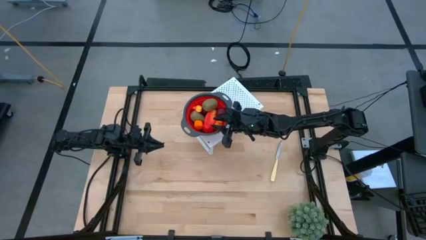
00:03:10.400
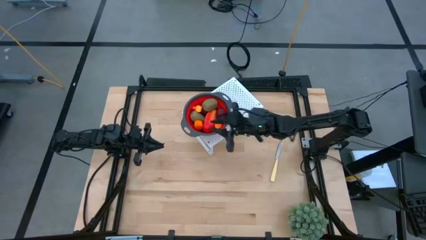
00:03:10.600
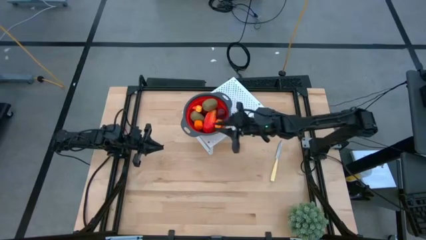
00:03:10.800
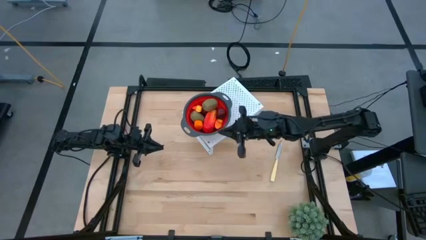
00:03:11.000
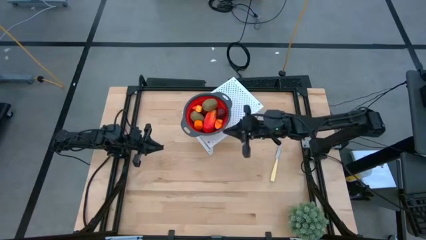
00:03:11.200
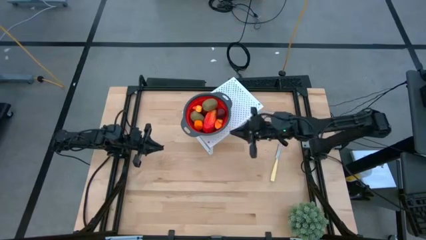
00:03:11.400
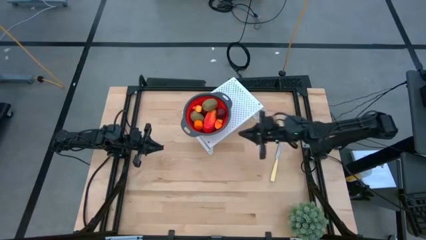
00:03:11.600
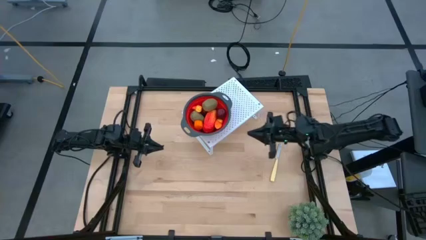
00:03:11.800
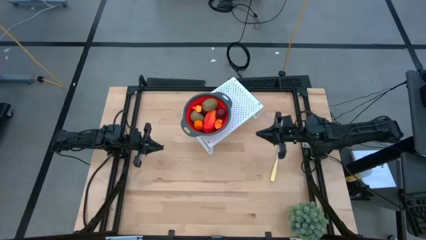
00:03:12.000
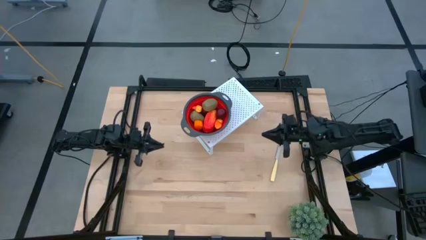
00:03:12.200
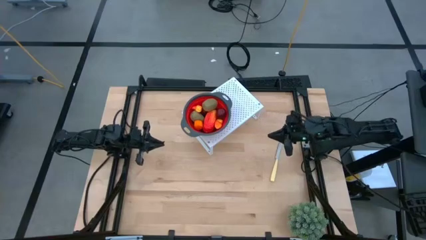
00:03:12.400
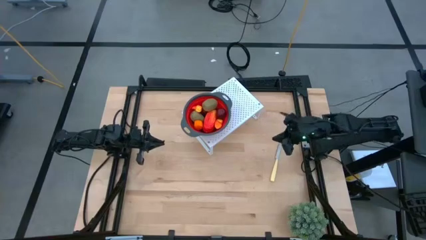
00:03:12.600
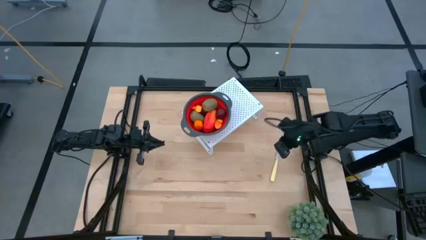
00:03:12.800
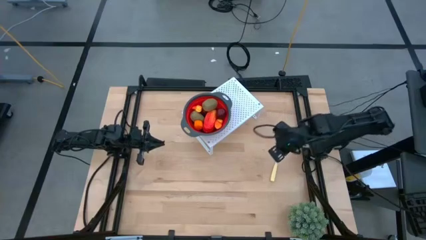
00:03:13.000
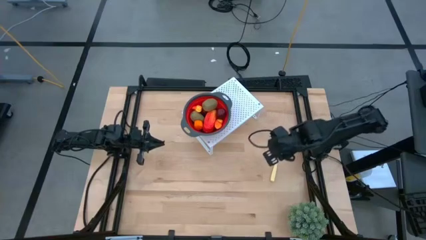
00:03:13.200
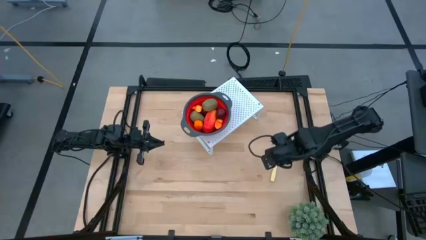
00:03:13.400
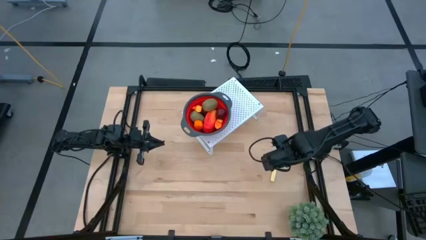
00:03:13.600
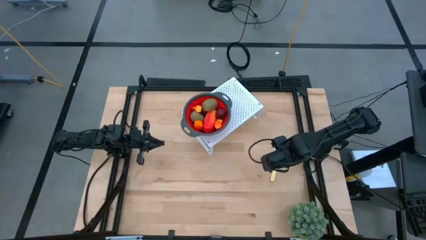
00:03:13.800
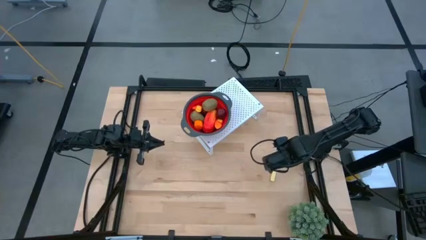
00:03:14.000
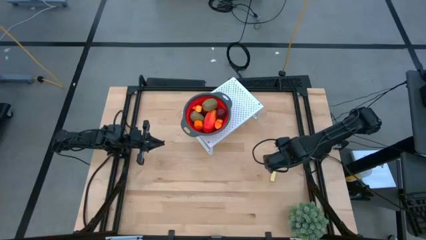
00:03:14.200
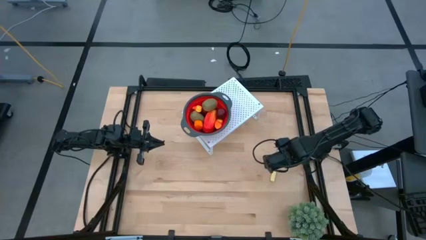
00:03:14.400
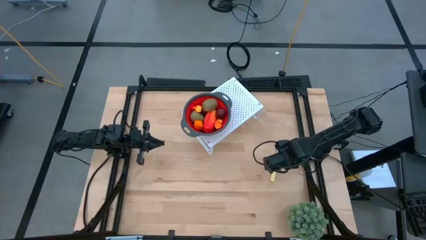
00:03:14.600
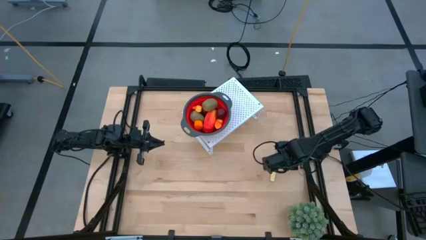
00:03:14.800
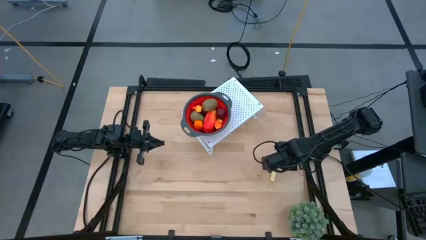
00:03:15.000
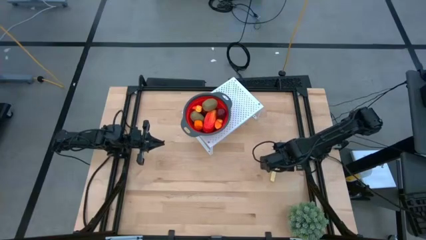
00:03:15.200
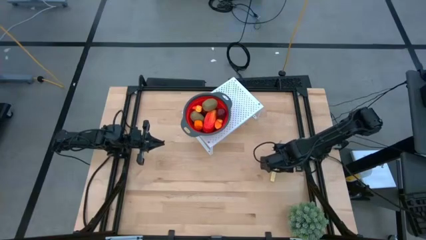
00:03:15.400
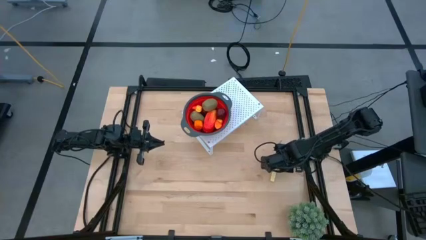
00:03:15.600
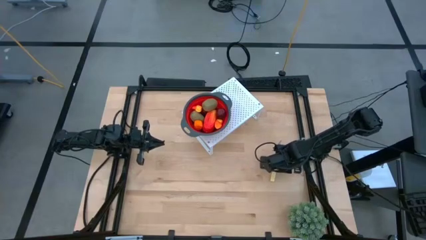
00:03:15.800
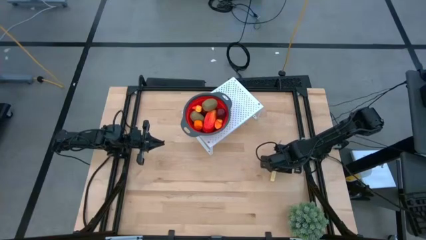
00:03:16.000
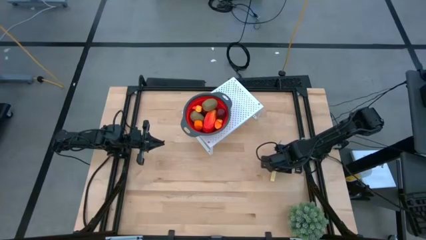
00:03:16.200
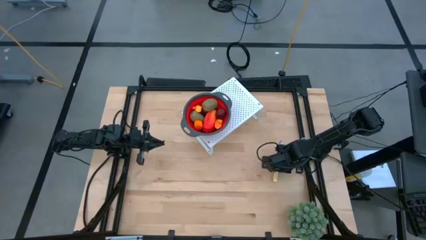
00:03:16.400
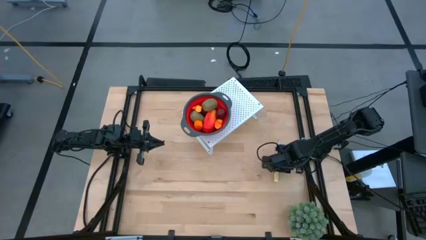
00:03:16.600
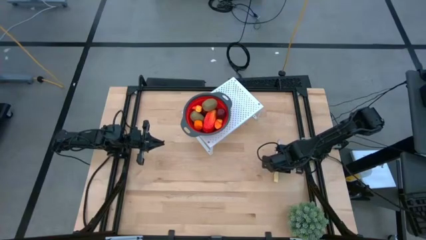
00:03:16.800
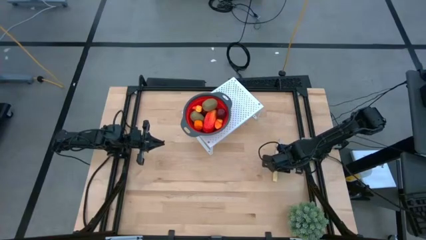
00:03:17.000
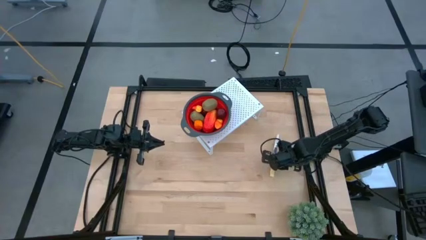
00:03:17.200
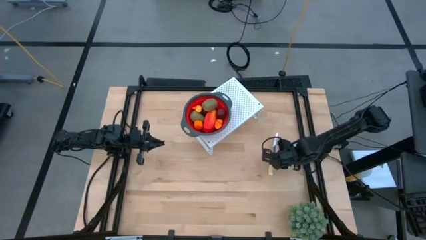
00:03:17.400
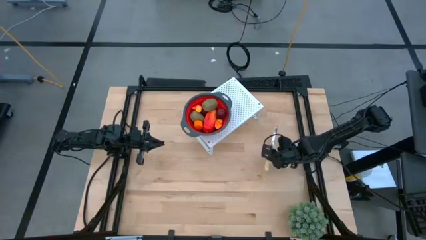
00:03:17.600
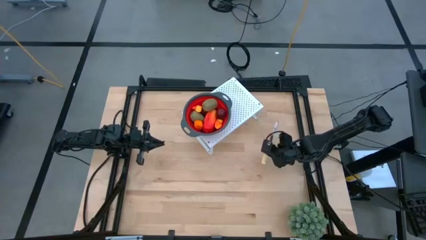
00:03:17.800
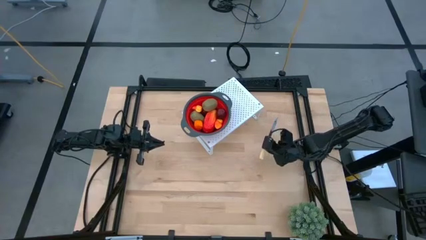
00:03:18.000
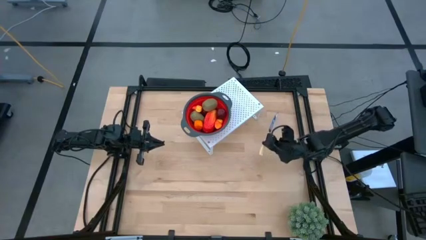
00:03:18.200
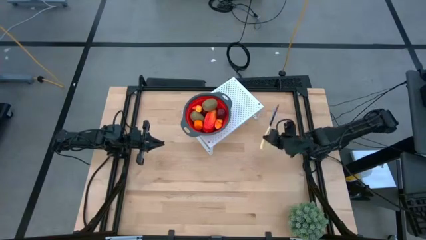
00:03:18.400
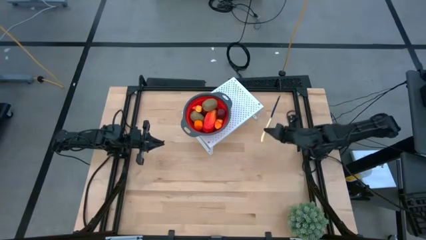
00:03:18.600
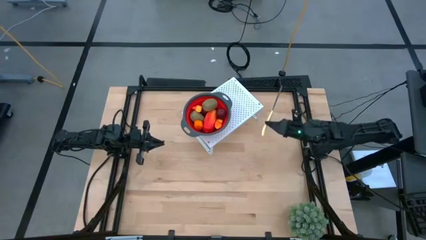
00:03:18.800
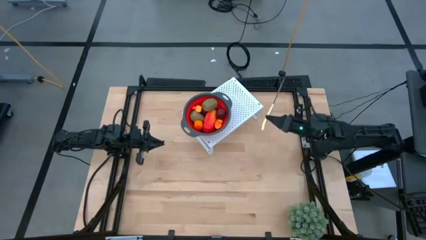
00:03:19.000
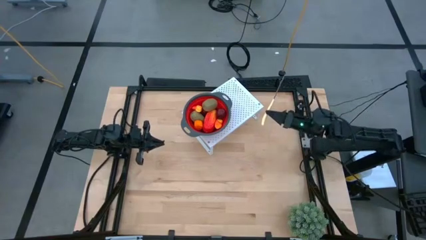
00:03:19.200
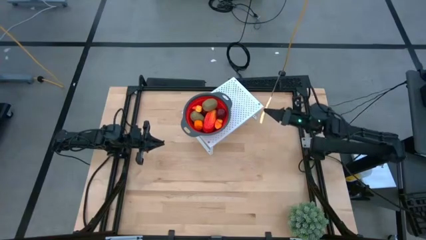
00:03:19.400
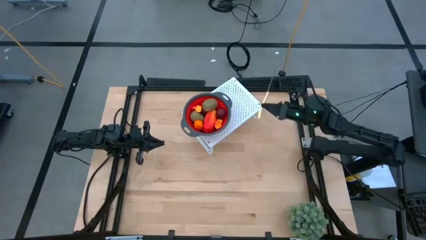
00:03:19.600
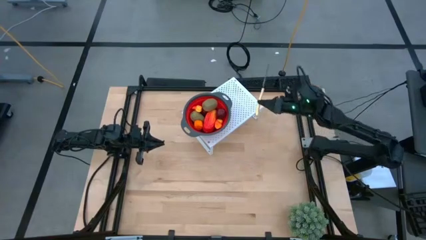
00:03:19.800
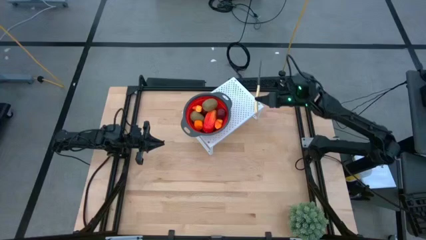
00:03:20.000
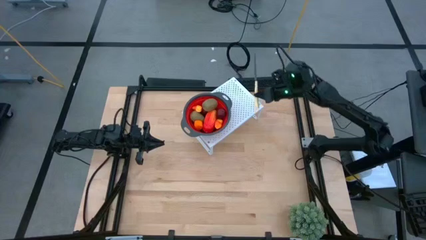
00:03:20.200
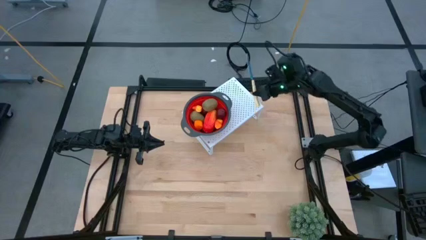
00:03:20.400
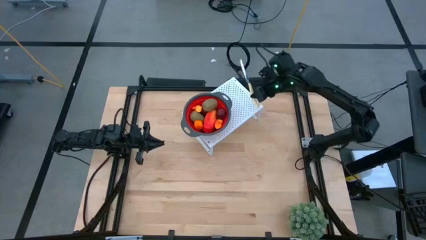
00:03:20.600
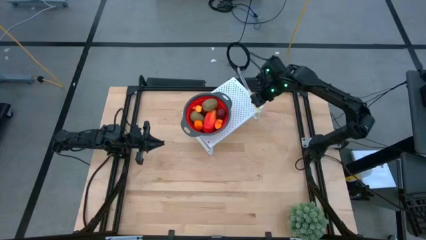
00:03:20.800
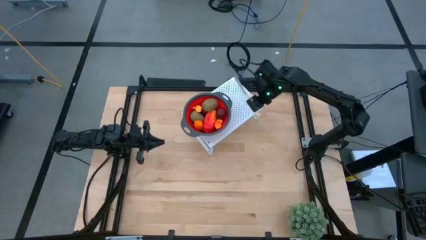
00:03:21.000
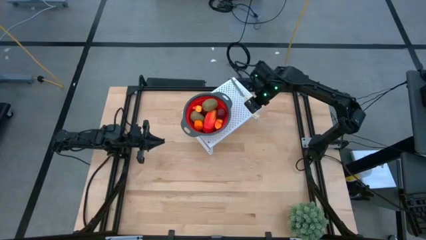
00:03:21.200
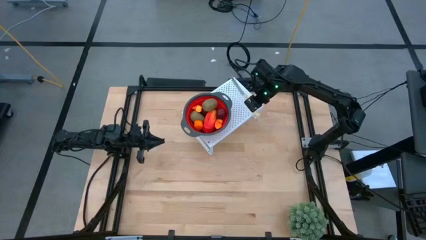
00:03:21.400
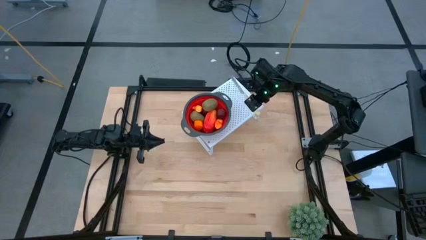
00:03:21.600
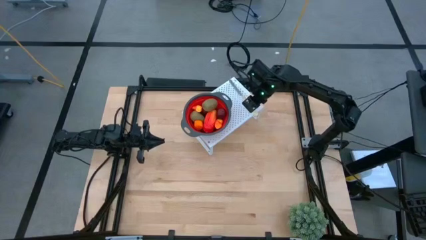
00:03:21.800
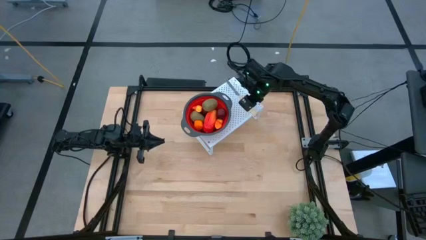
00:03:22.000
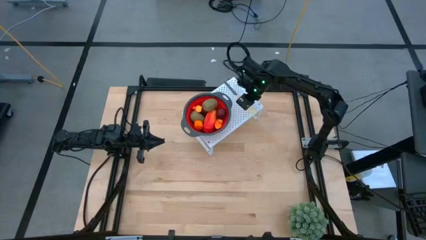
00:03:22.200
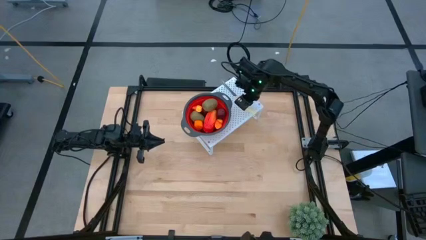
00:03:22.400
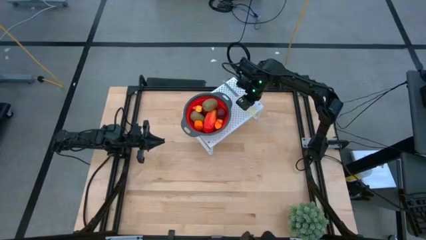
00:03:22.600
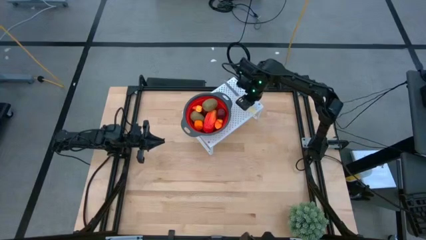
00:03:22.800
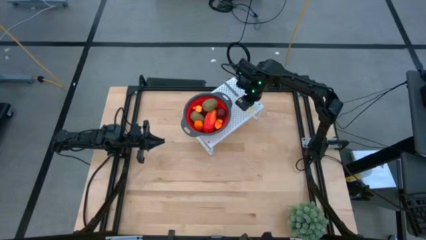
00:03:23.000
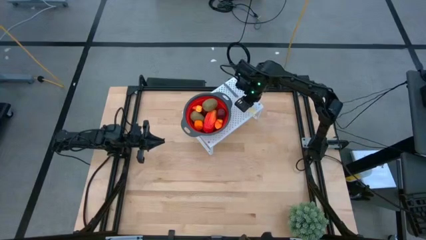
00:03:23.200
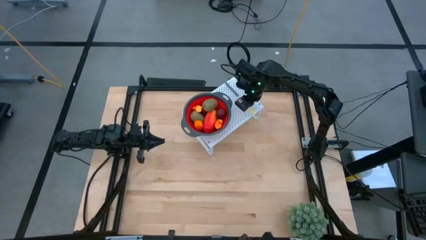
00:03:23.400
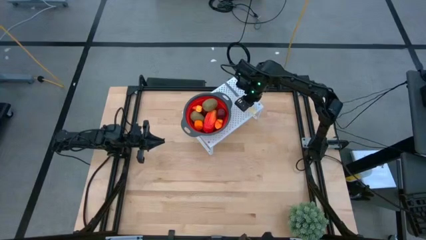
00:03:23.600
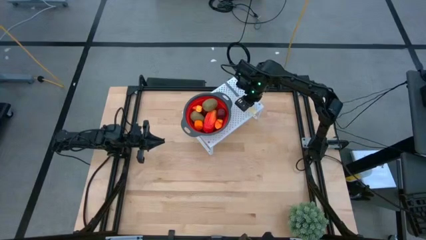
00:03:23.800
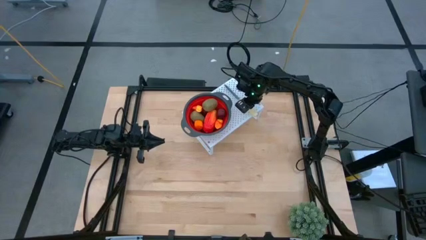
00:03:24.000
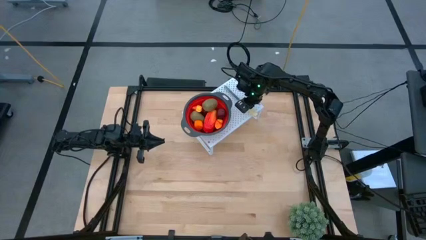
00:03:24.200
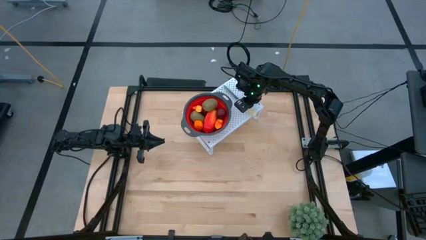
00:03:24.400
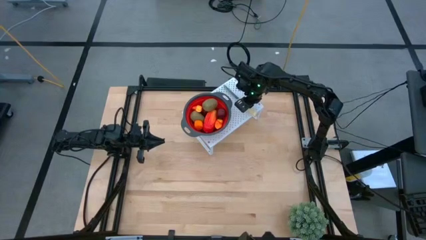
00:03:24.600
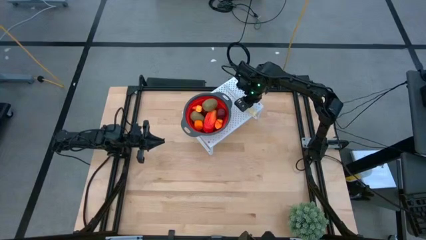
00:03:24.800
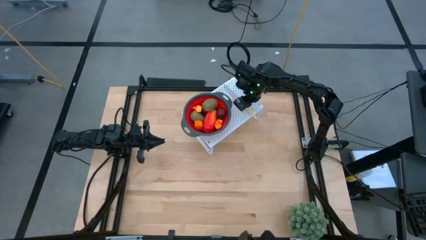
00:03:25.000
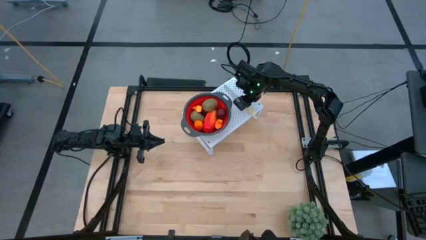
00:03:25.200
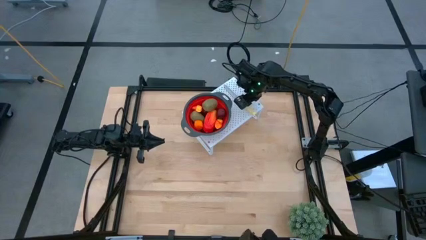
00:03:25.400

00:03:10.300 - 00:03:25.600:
Task: Pick & Place Fruit
Put the yellow knife on the shelf

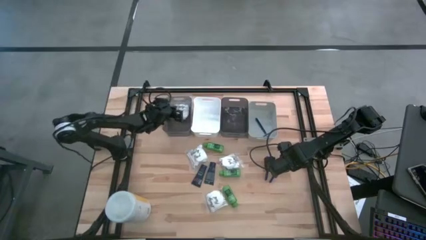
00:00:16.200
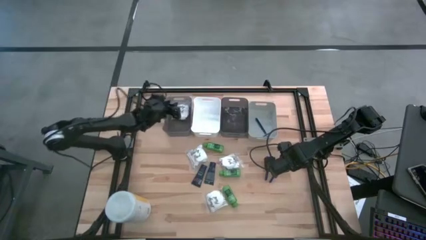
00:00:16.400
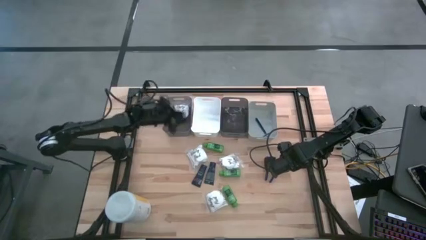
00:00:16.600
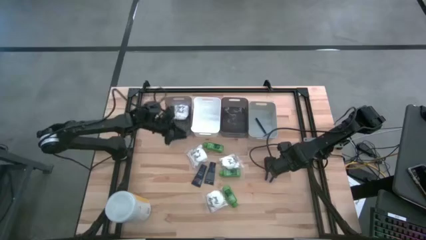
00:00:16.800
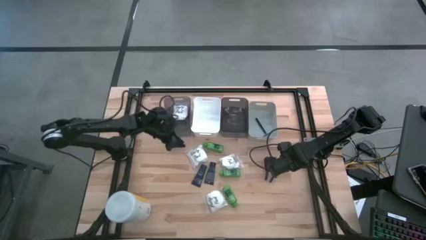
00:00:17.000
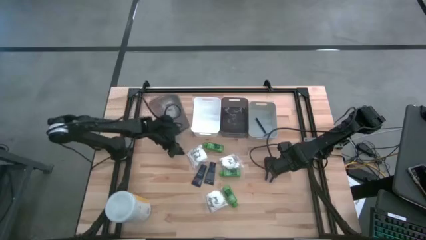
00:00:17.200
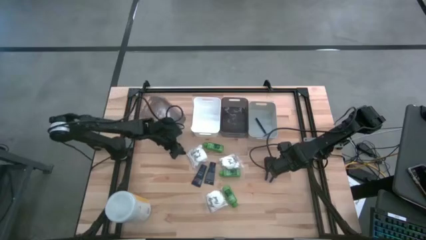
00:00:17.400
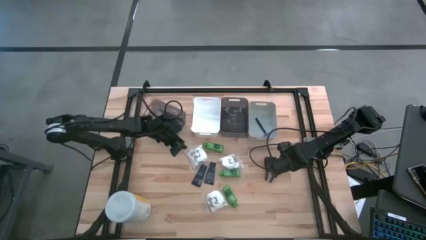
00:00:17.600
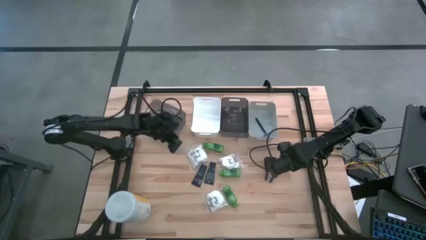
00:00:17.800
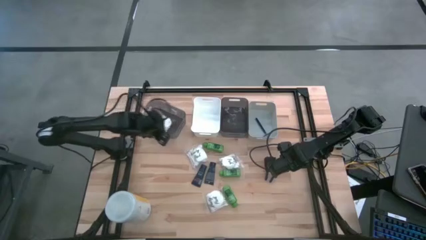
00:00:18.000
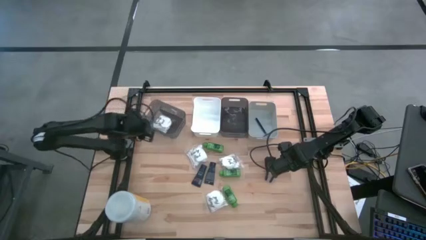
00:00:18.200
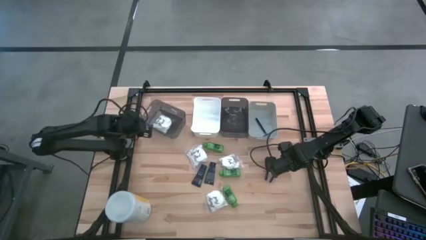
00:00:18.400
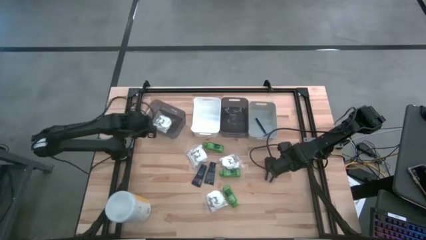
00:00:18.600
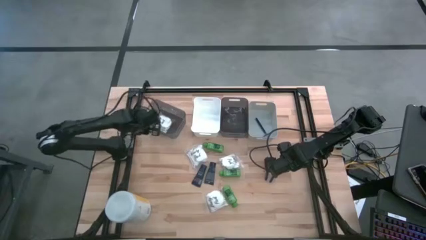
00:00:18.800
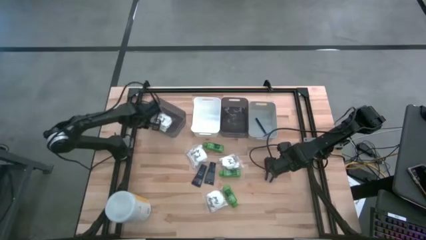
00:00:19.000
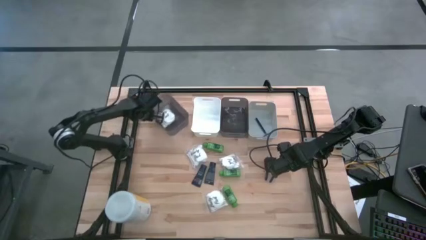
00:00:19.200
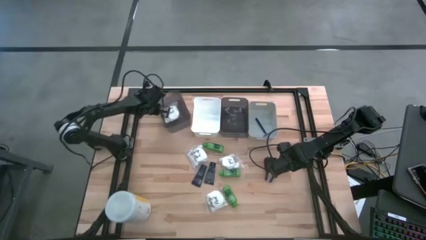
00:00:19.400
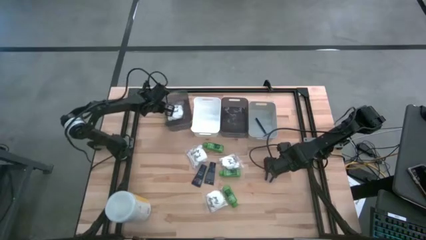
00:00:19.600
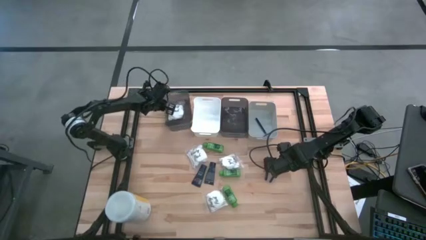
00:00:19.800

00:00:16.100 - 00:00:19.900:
Task: Pick & Place Travel size toiletries
Adjust the left black bin
